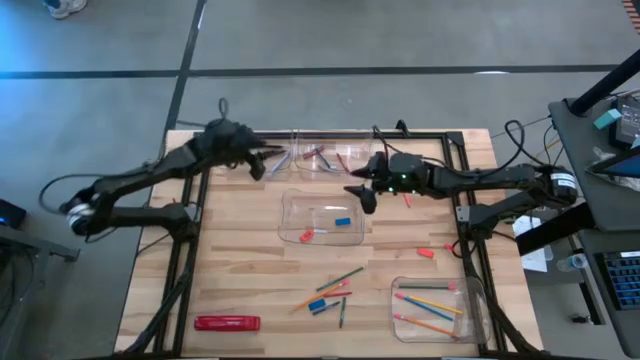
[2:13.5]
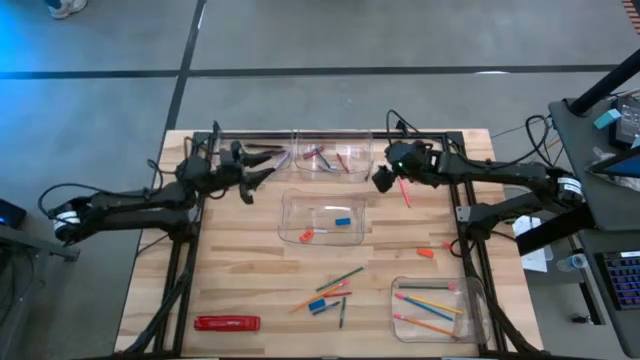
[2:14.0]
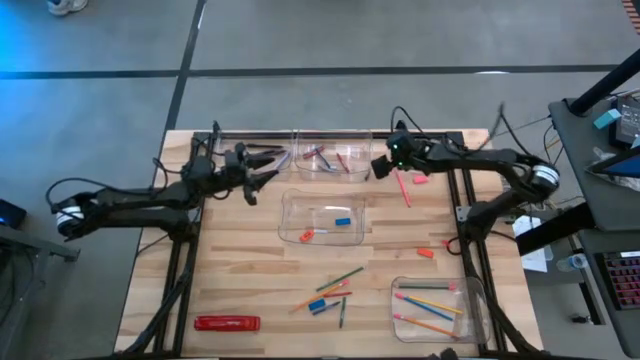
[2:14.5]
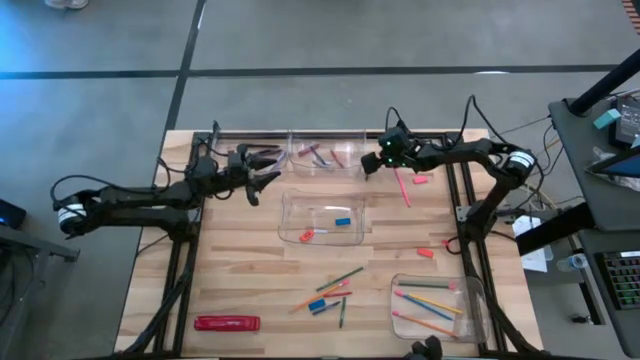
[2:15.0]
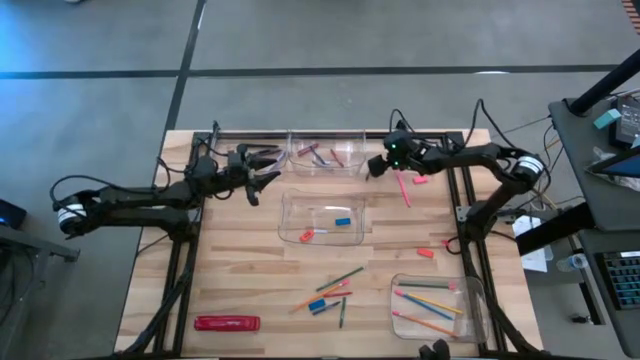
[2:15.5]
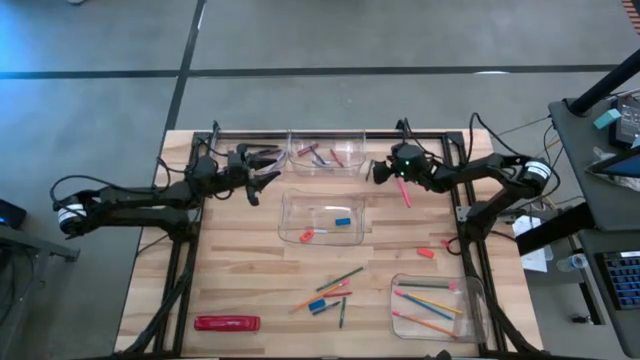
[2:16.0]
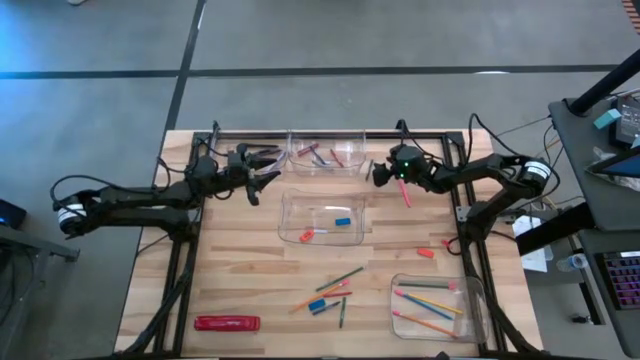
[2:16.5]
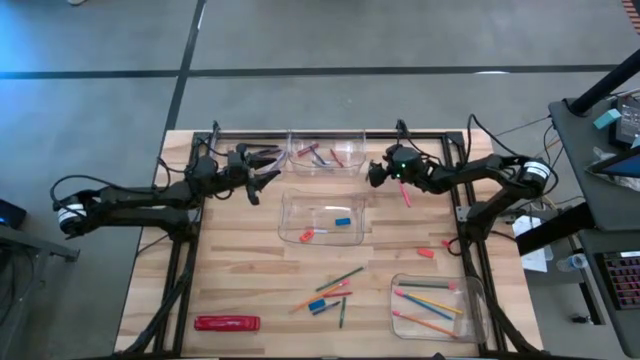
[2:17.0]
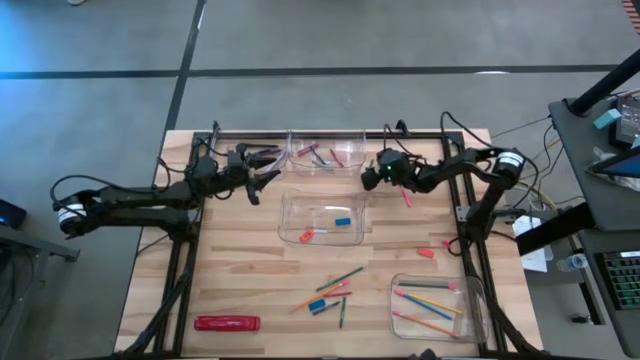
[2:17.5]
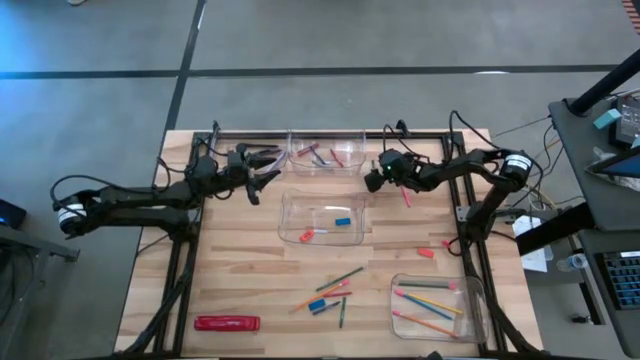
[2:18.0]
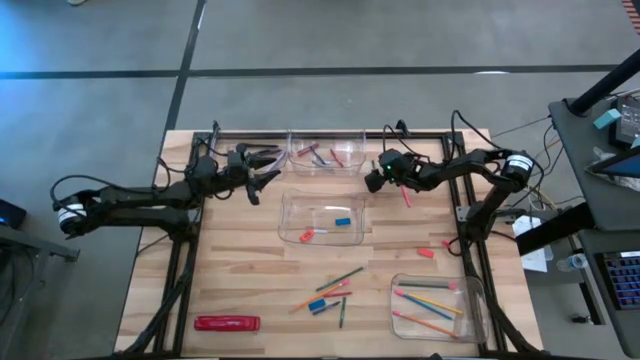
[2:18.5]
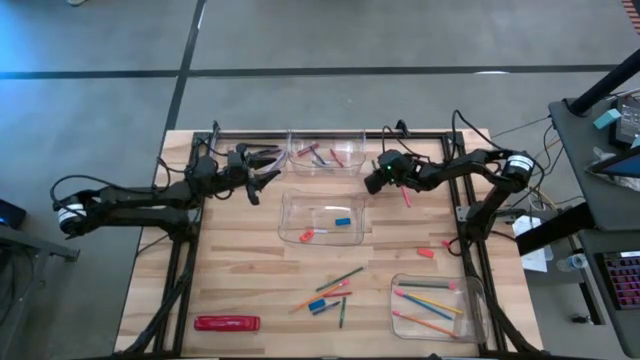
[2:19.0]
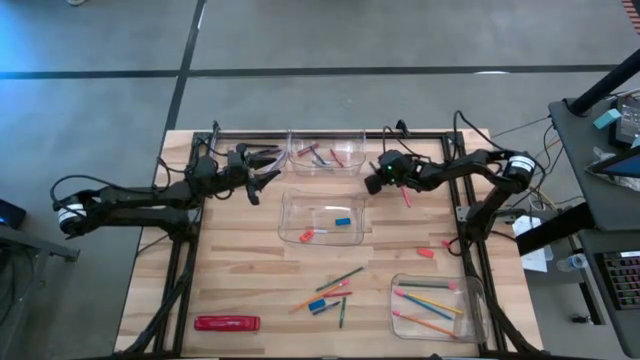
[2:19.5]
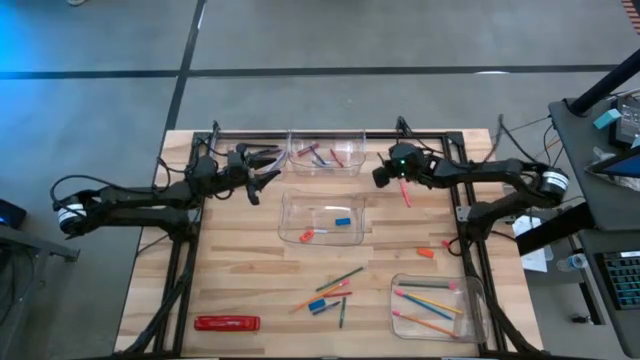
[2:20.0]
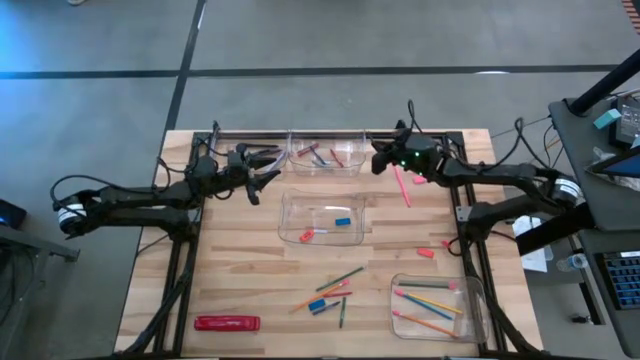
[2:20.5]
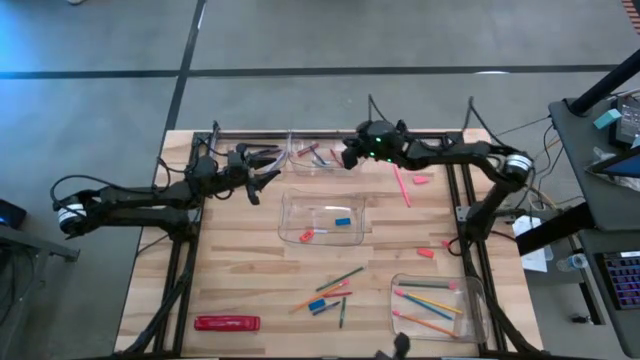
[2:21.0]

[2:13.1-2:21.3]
Task: Sort crayons/erasers/pens/pencils in bins
Put the green crayon into the top right transparent bin

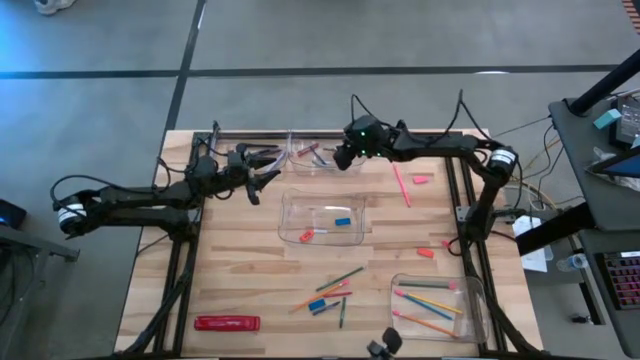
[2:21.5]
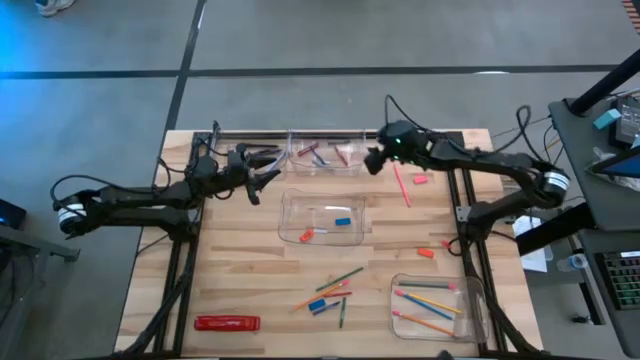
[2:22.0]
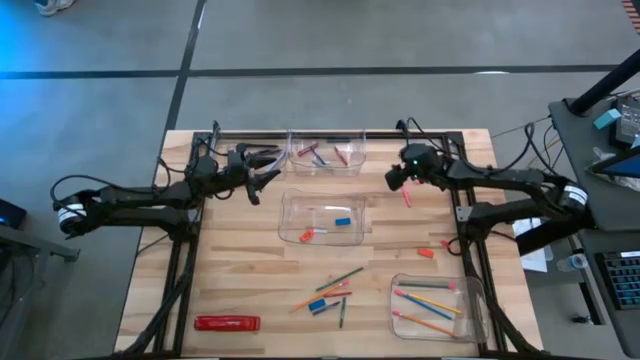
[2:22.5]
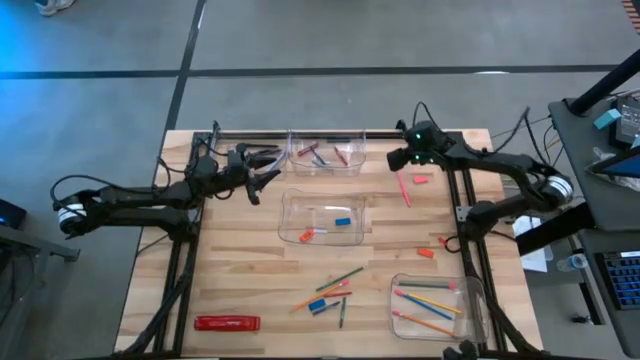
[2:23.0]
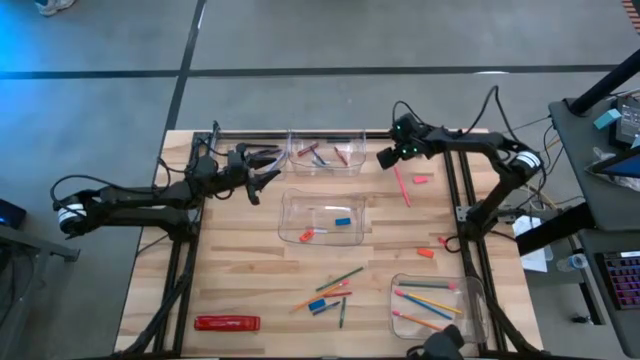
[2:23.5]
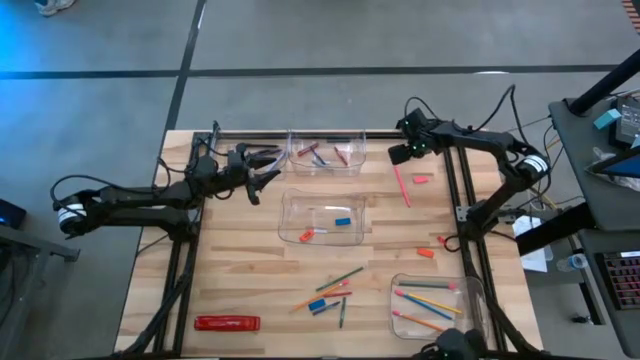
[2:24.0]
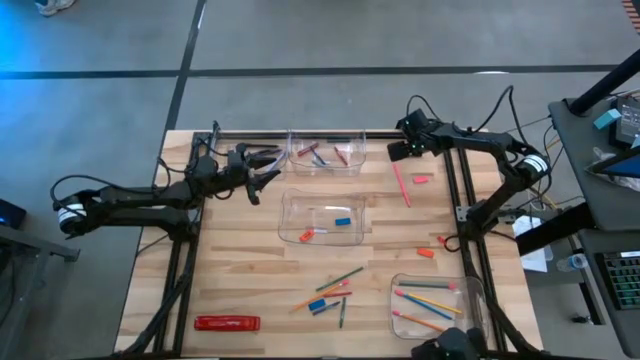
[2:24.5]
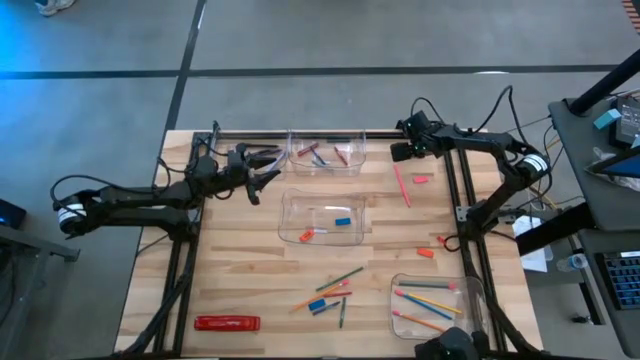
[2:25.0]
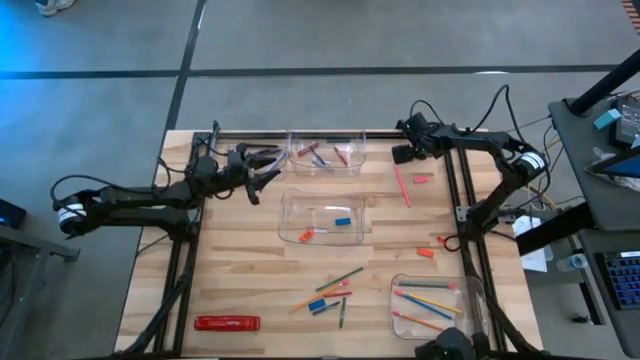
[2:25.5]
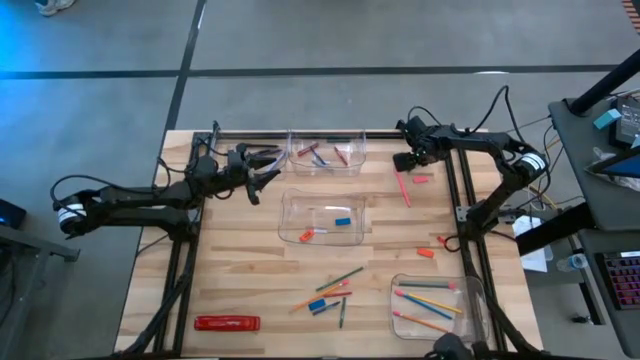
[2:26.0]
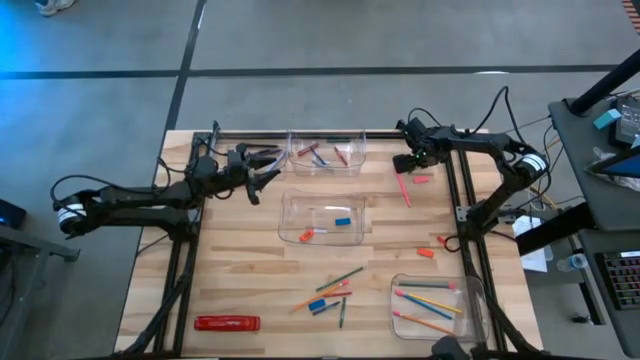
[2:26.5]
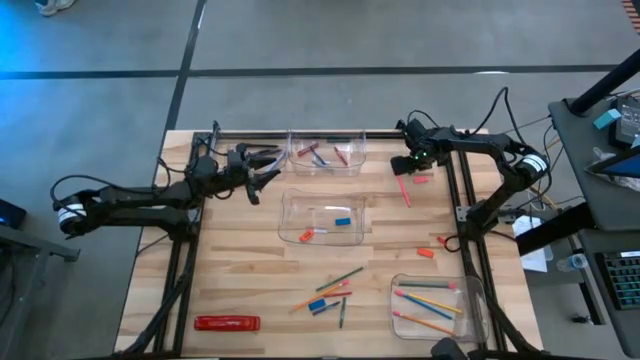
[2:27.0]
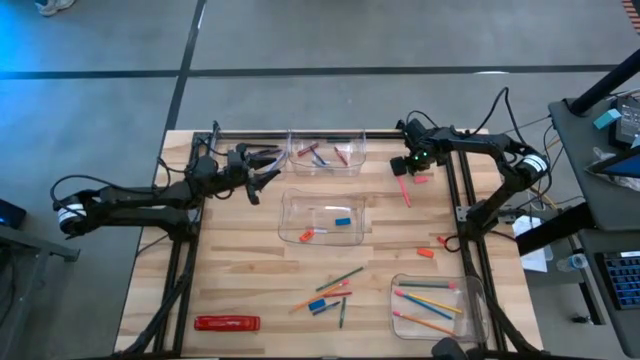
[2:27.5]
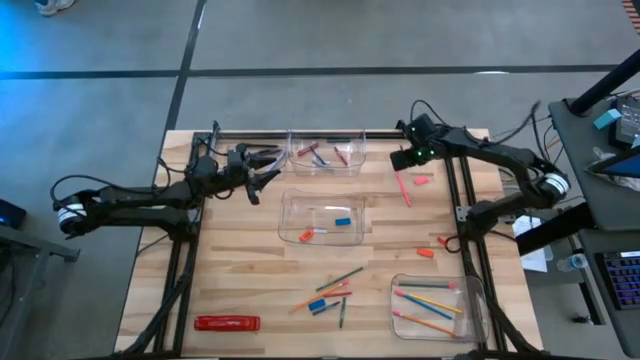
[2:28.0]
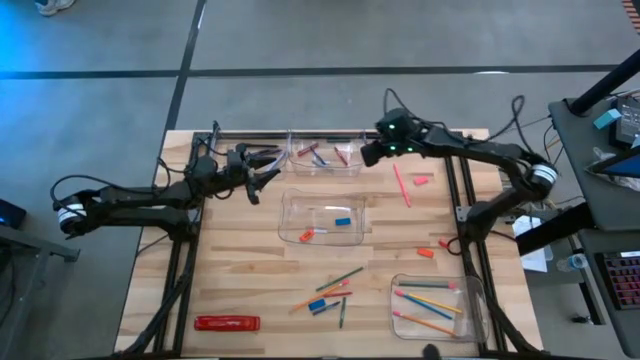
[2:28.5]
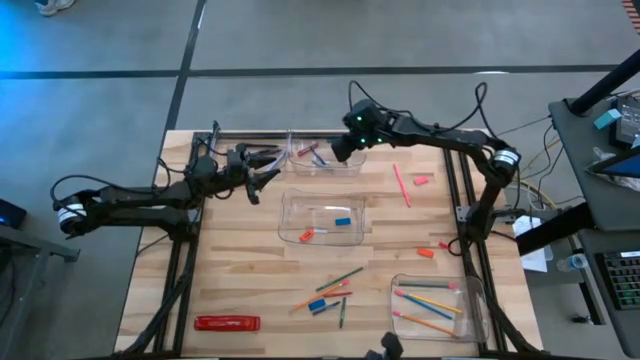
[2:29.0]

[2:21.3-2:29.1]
Put the blue crayon into the top right transparent bin

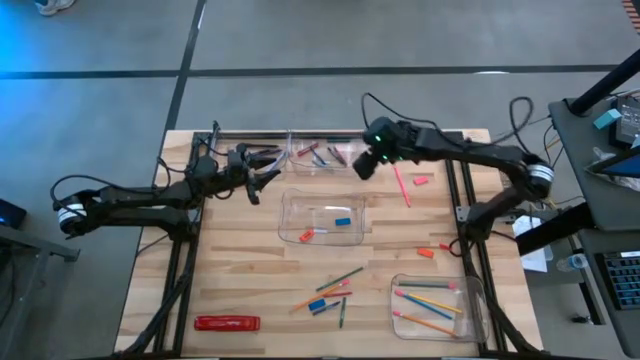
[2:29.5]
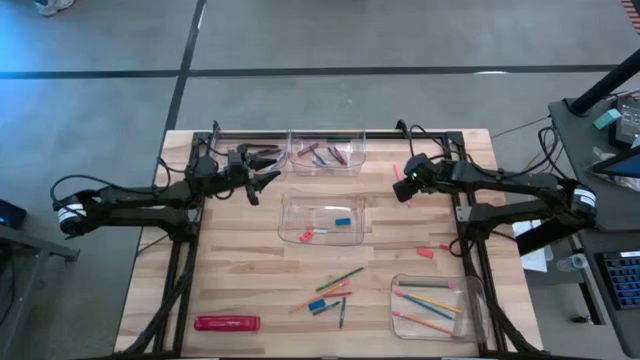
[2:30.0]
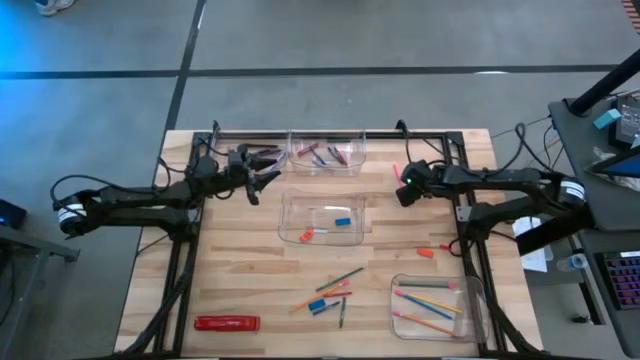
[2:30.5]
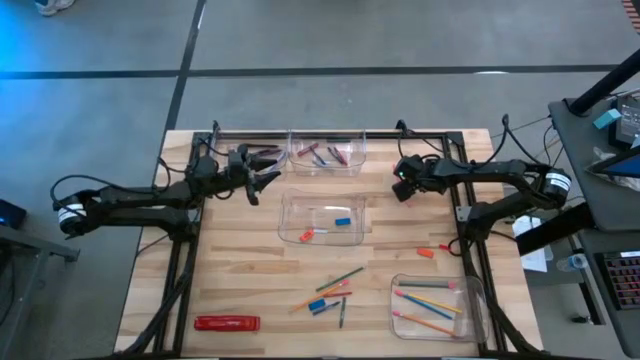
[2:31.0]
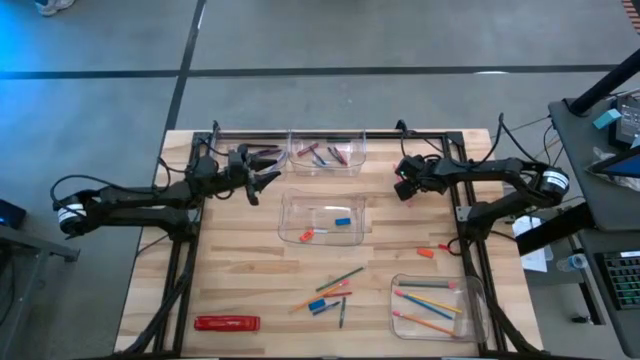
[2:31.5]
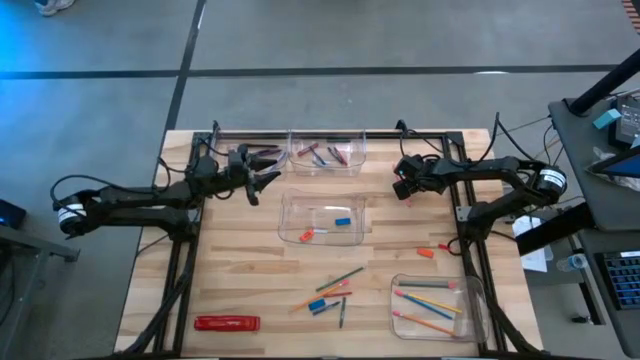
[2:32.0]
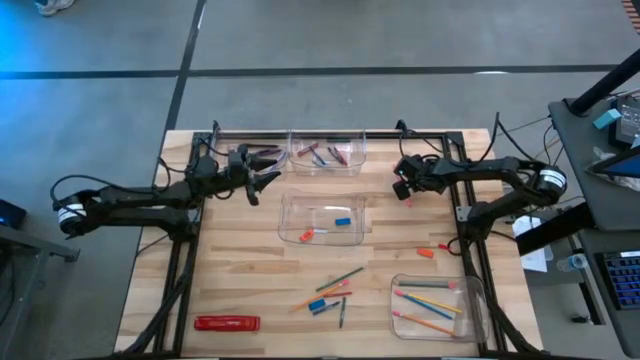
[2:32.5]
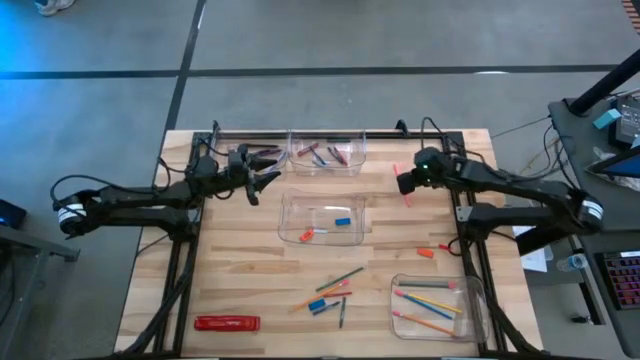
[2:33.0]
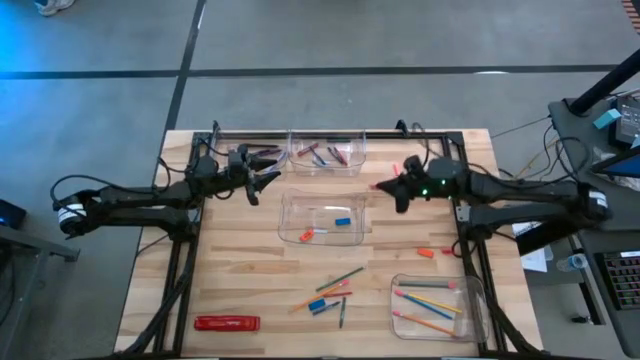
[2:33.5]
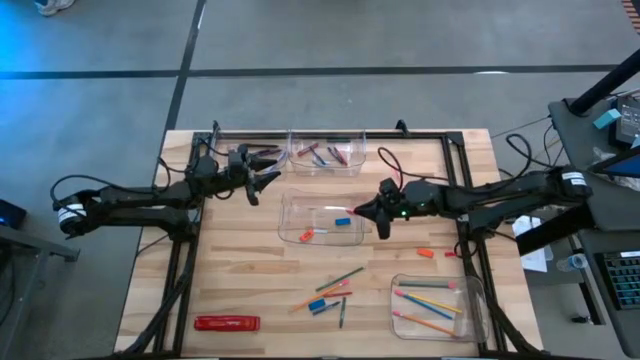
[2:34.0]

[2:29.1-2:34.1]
Put the pink eraser into the middle transparent bin
